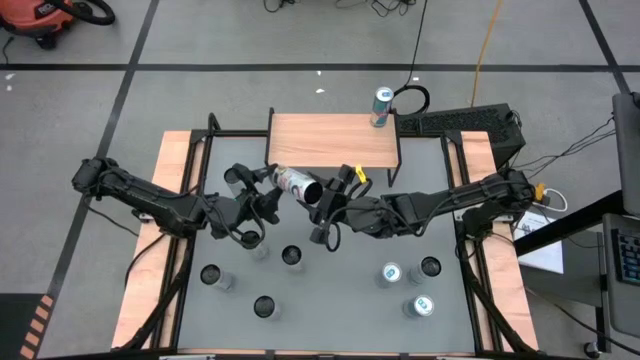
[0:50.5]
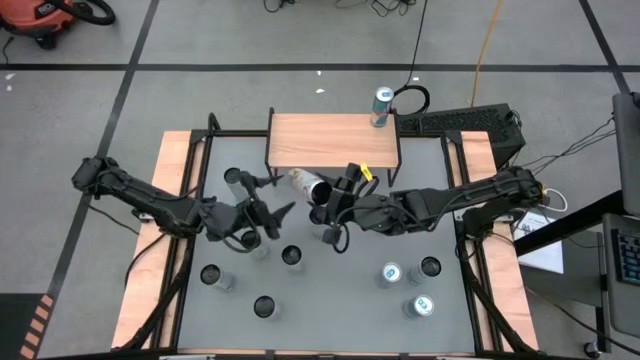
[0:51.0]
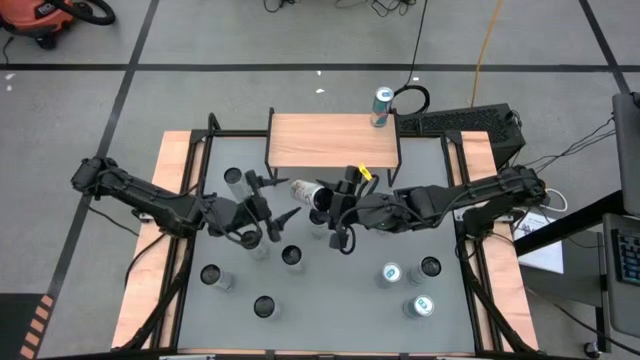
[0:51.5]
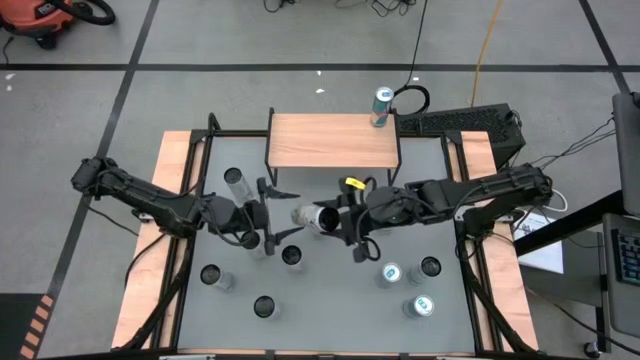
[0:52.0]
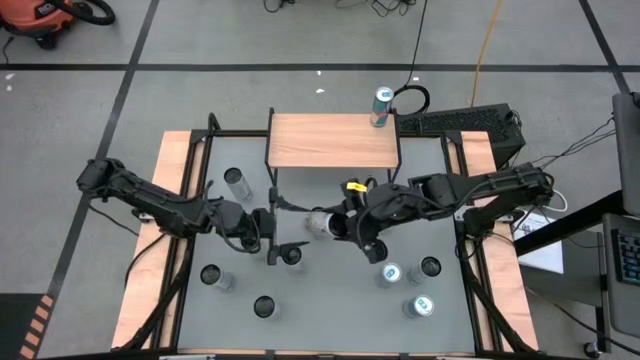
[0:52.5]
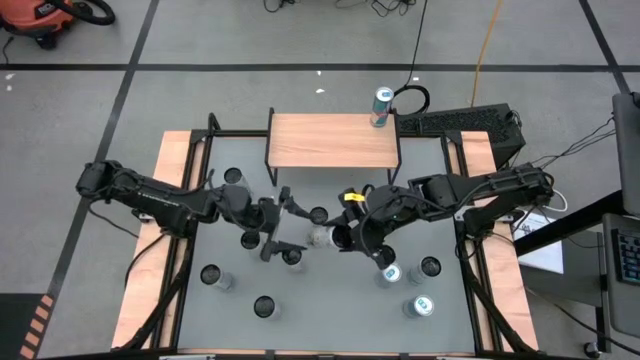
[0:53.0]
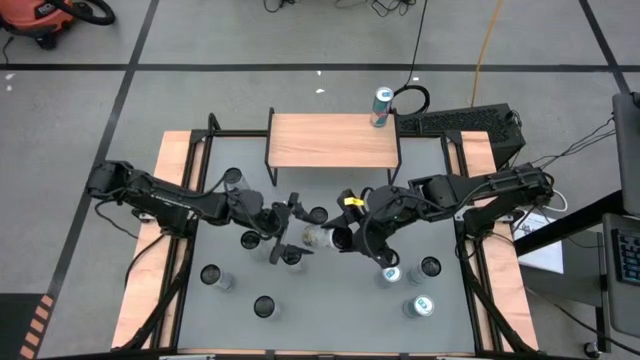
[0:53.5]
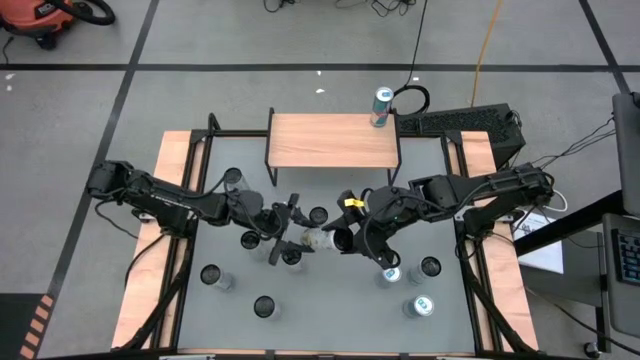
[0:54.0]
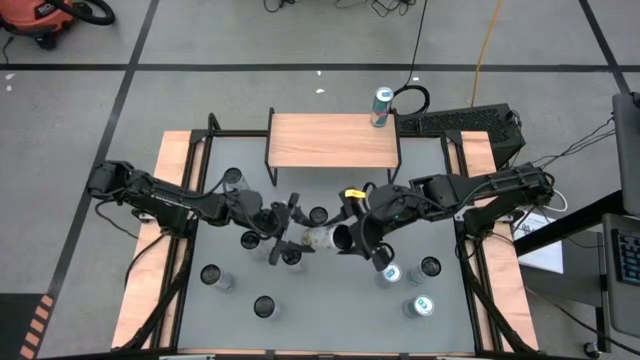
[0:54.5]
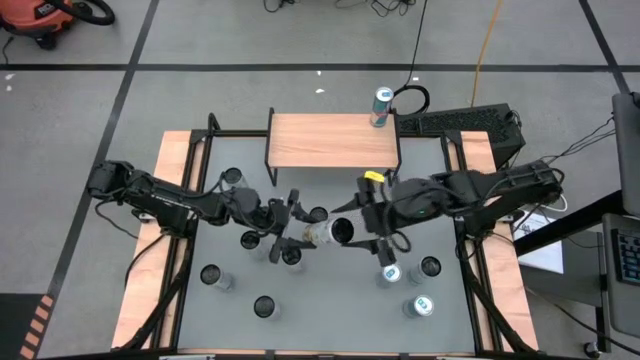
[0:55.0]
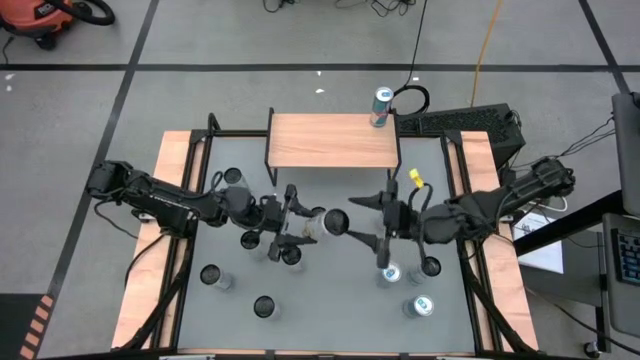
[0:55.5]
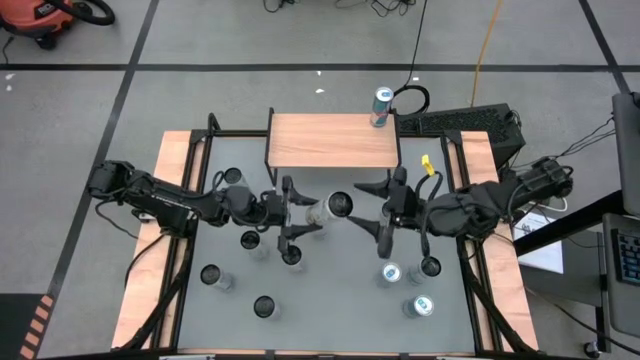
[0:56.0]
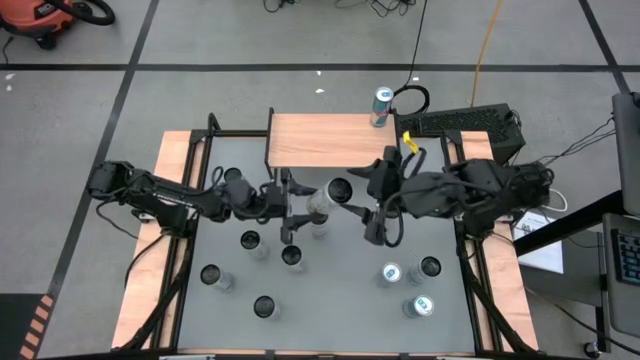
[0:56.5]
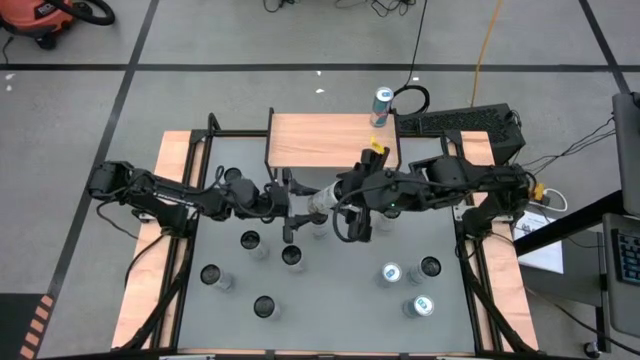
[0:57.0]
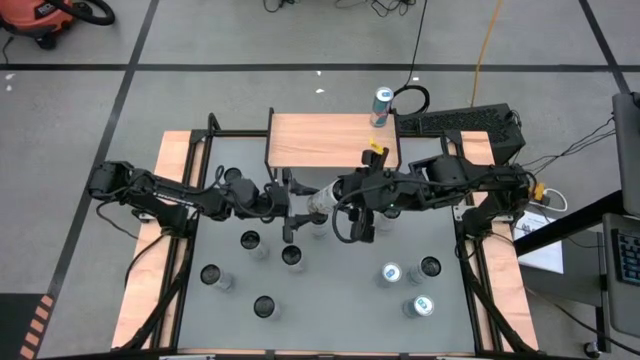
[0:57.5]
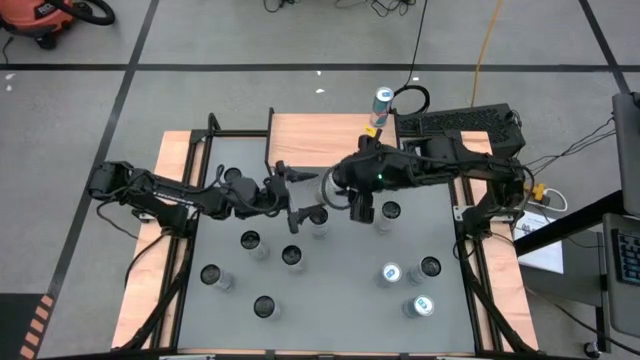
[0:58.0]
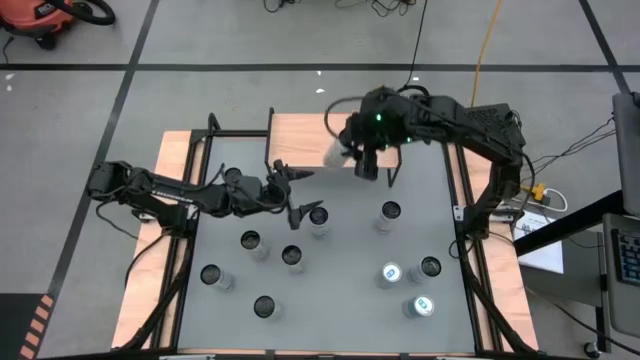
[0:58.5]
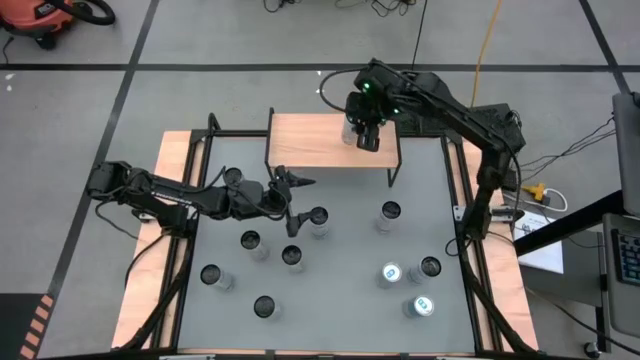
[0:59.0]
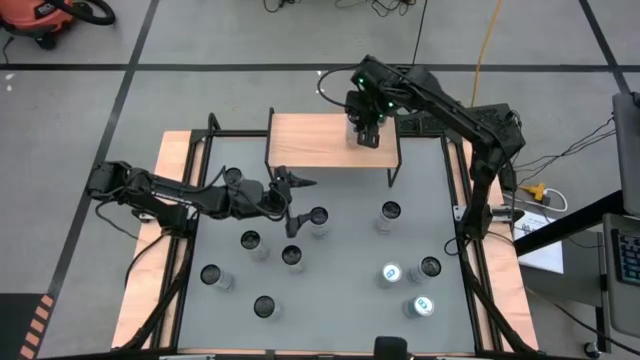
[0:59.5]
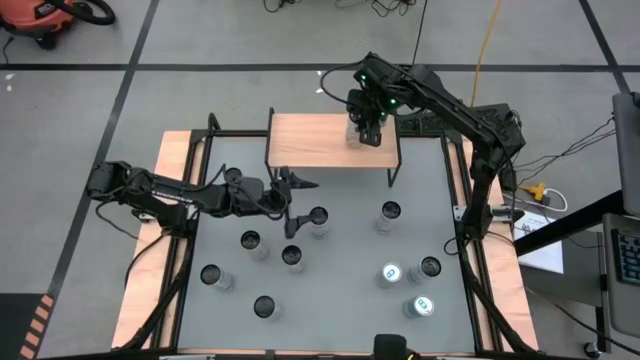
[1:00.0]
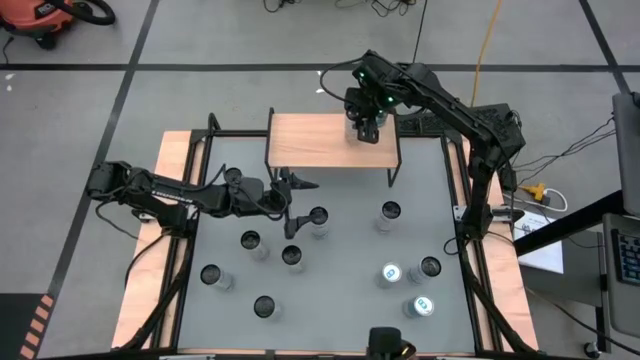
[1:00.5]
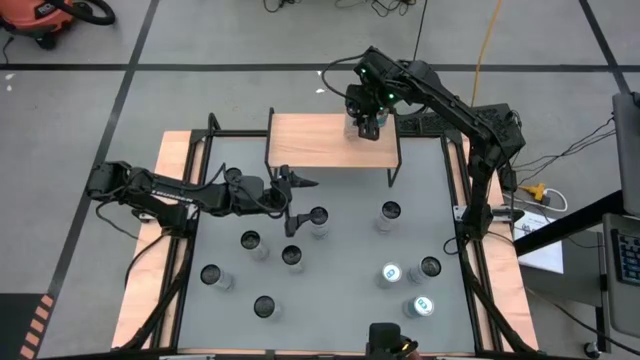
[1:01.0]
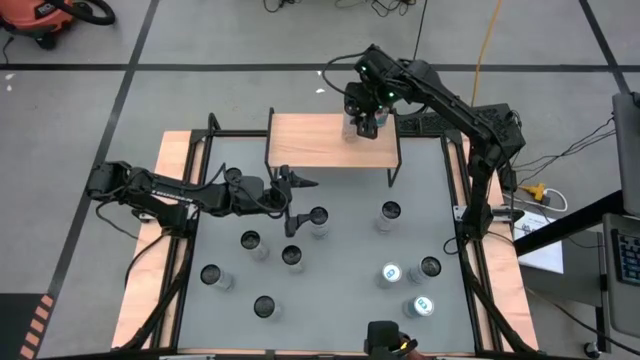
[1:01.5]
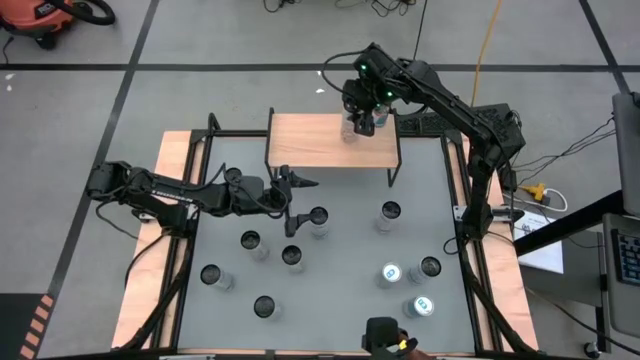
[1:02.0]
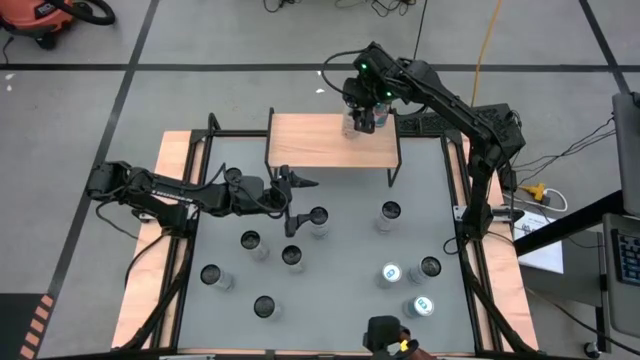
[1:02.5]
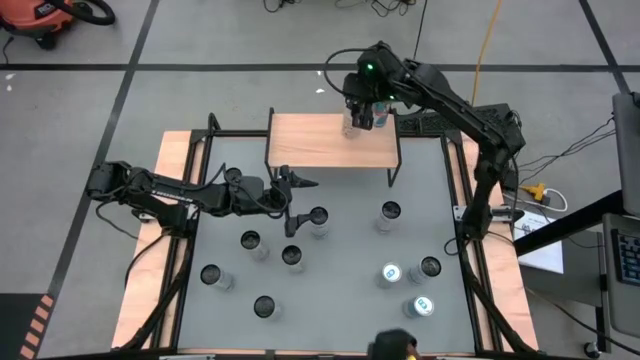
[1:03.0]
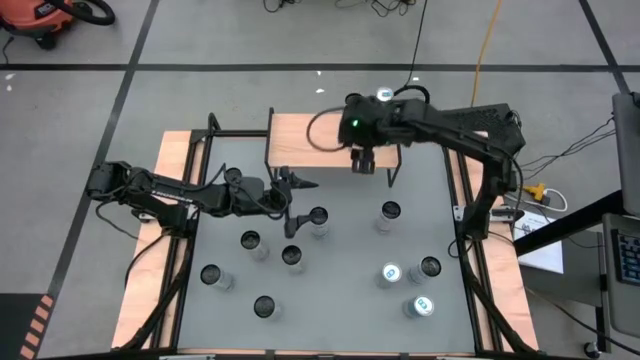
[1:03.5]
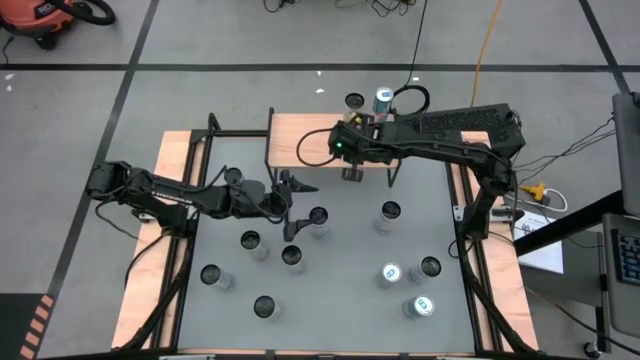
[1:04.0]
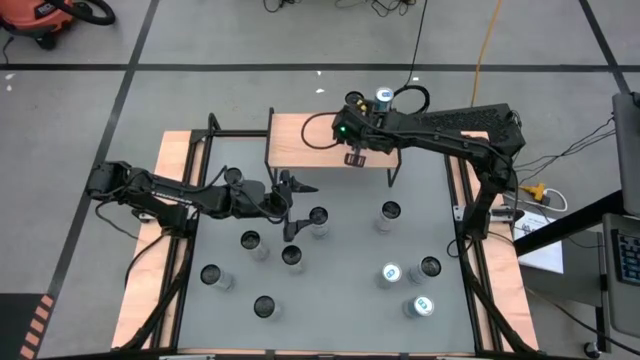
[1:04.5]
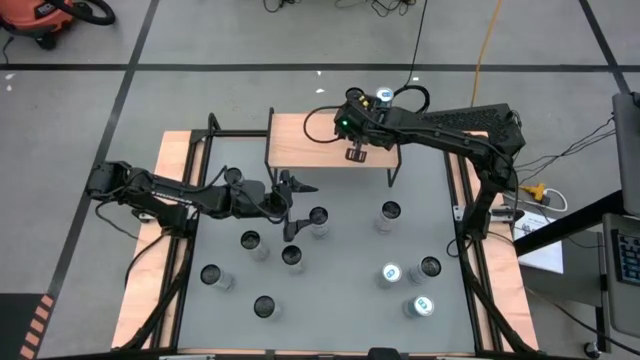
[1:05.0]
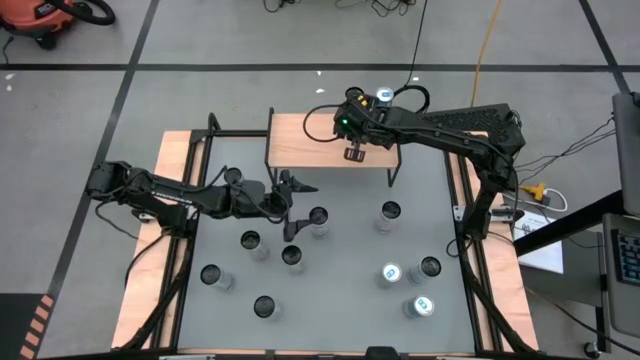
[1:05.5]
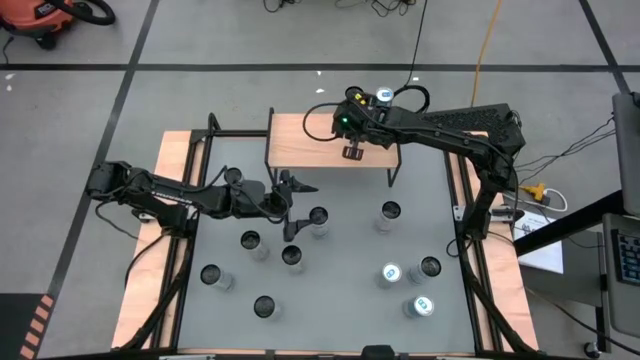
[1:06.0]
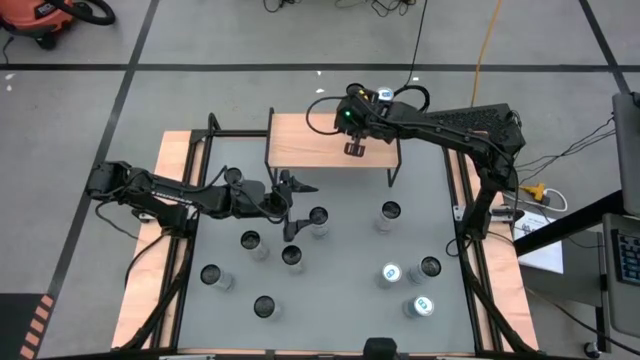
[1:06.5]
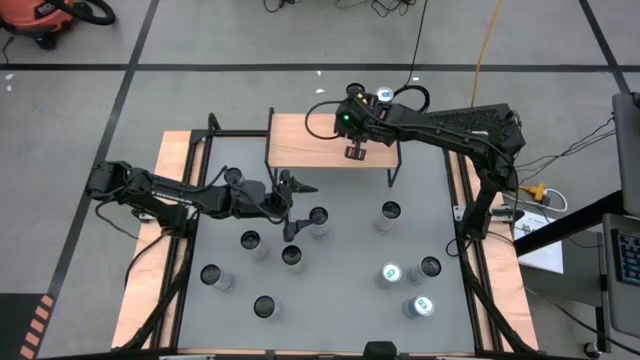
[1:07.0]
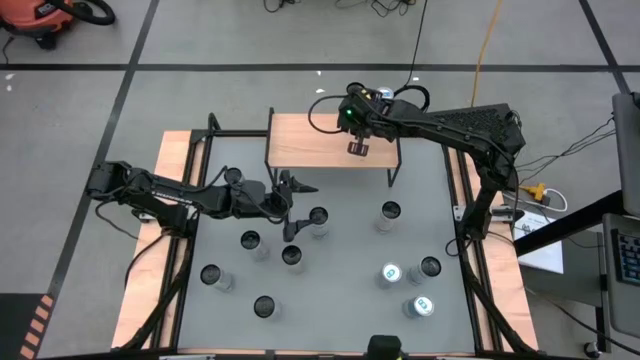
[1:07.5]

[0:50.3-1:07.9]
Task: Place canned beverage on shelf
Put the right white yellow soda can on the shelf
